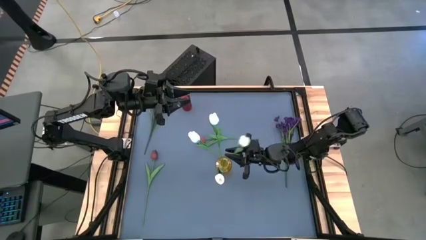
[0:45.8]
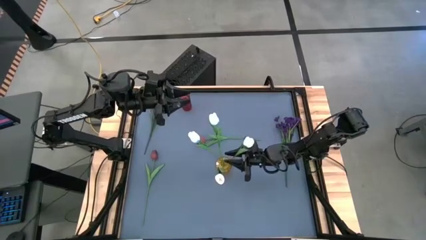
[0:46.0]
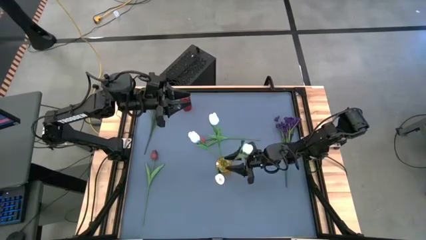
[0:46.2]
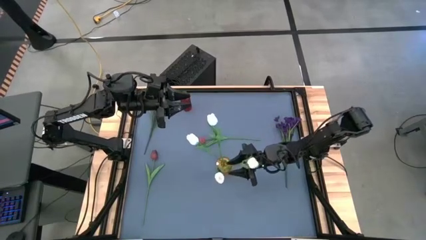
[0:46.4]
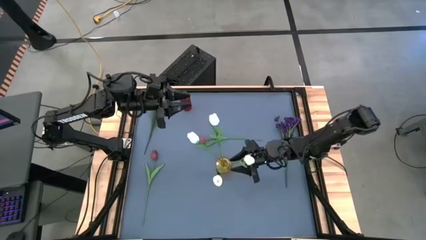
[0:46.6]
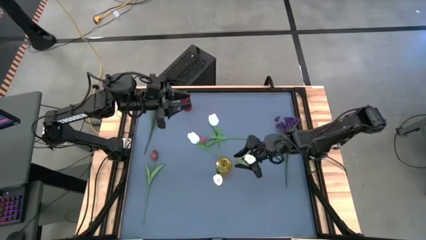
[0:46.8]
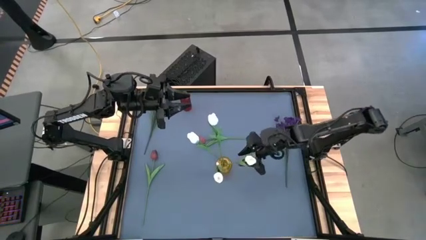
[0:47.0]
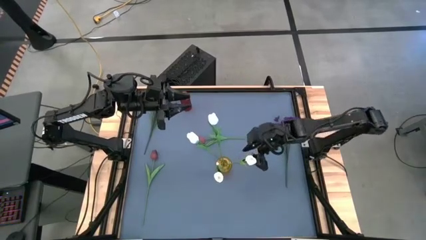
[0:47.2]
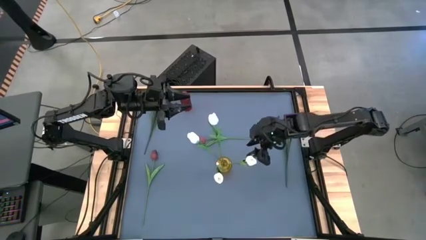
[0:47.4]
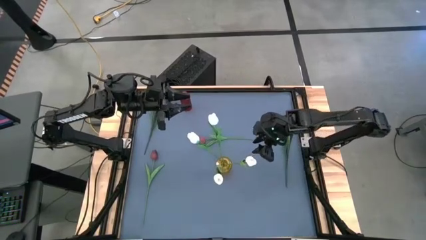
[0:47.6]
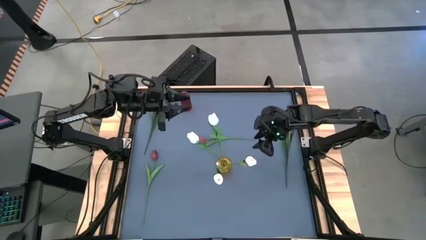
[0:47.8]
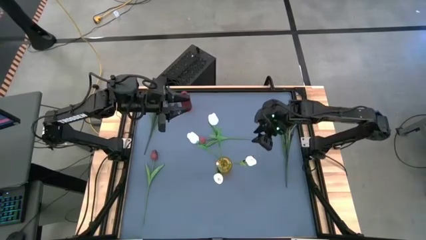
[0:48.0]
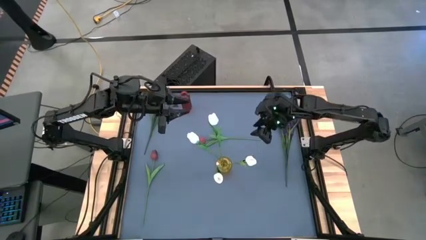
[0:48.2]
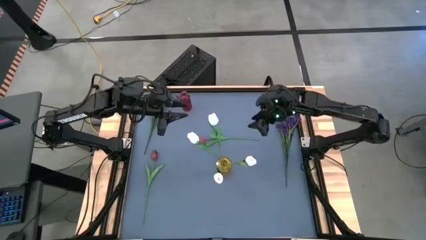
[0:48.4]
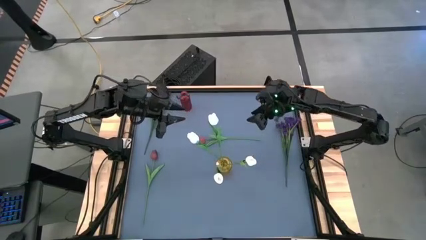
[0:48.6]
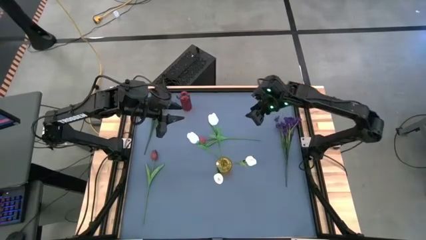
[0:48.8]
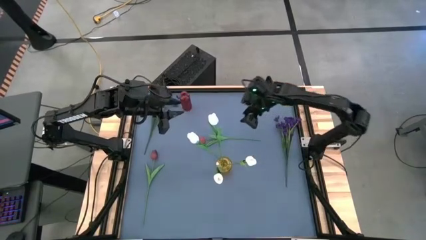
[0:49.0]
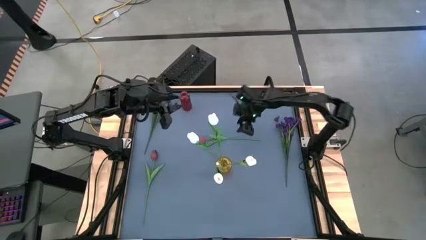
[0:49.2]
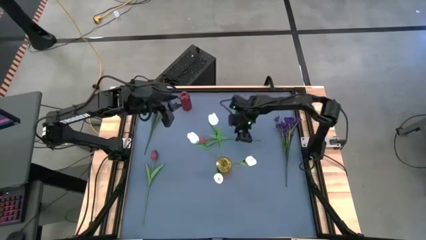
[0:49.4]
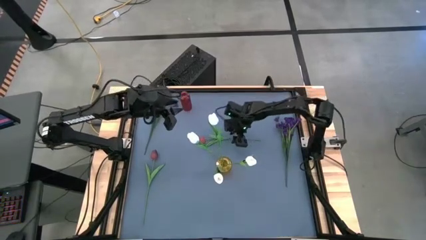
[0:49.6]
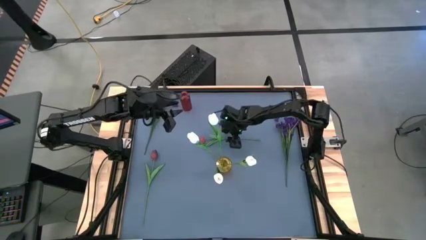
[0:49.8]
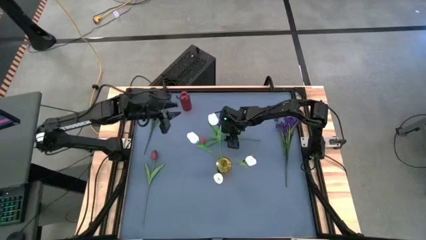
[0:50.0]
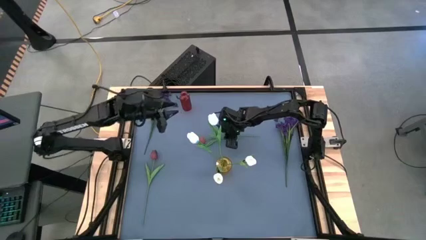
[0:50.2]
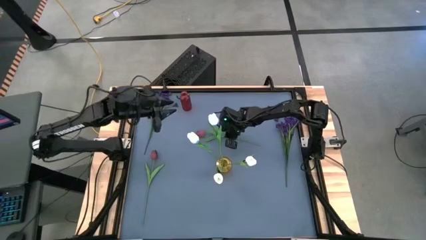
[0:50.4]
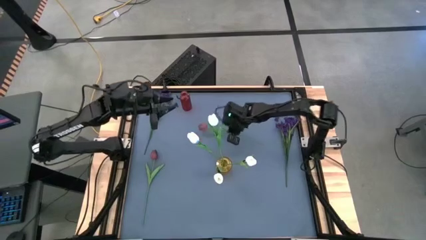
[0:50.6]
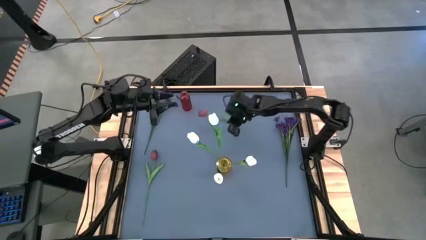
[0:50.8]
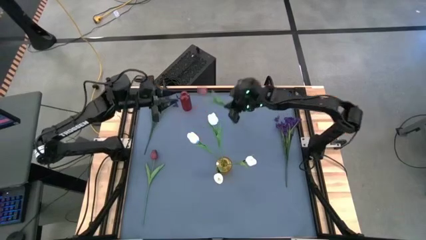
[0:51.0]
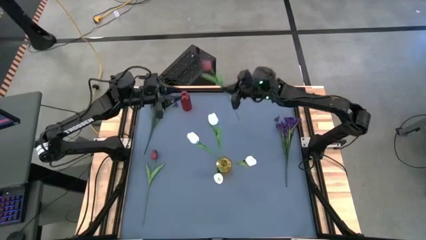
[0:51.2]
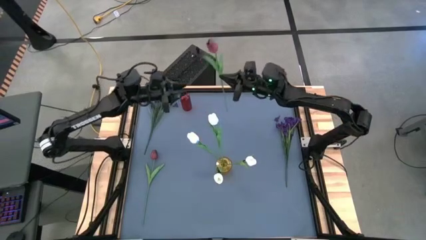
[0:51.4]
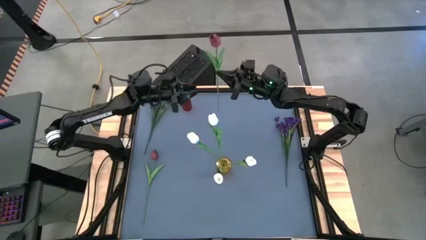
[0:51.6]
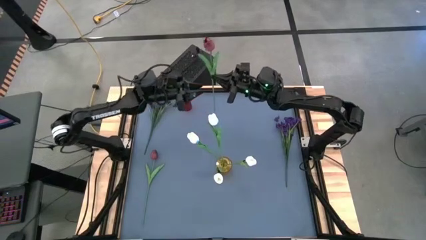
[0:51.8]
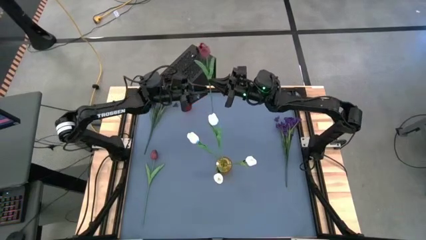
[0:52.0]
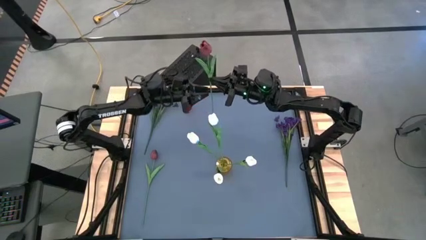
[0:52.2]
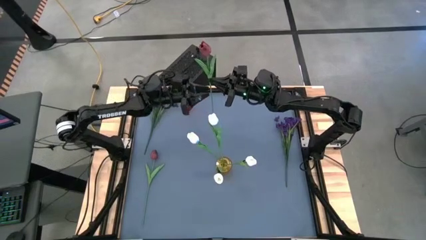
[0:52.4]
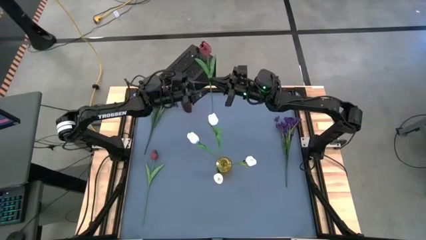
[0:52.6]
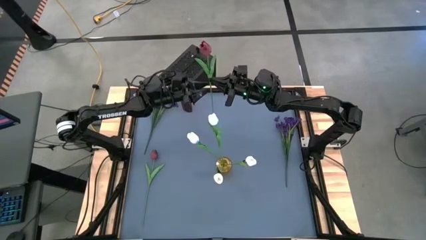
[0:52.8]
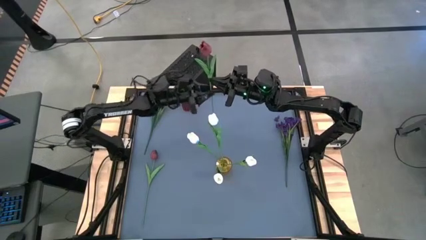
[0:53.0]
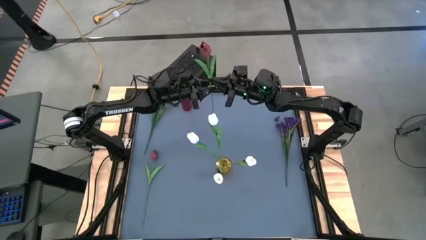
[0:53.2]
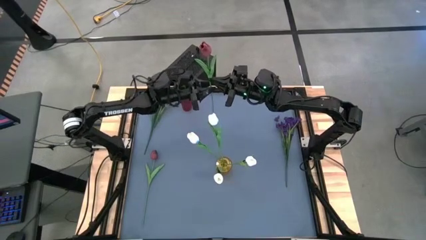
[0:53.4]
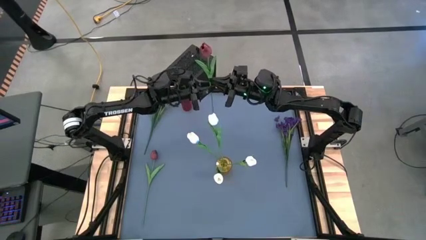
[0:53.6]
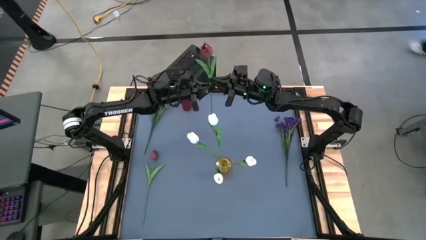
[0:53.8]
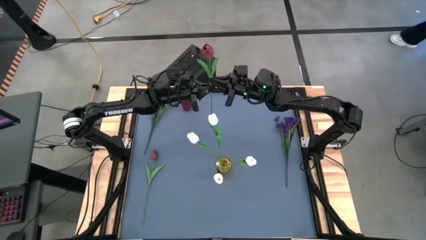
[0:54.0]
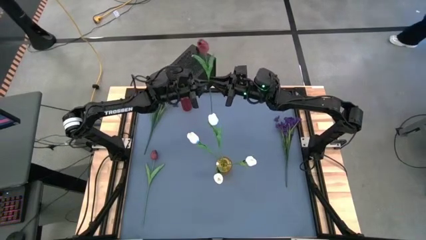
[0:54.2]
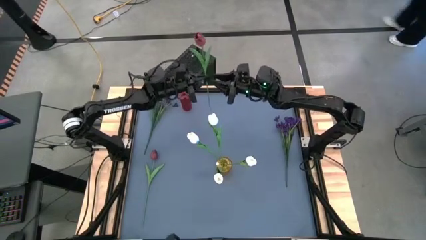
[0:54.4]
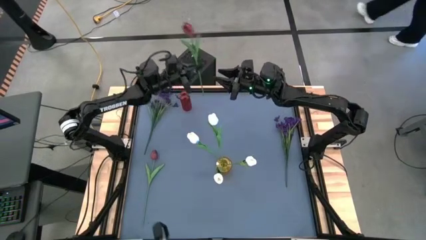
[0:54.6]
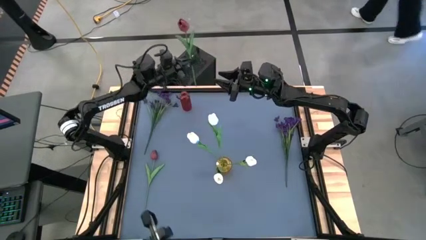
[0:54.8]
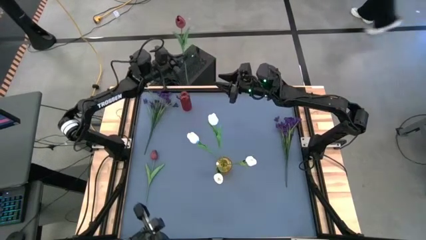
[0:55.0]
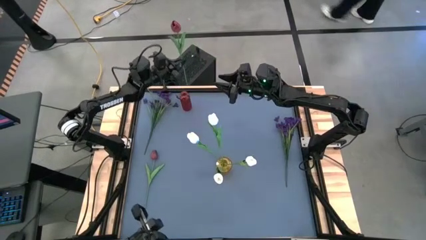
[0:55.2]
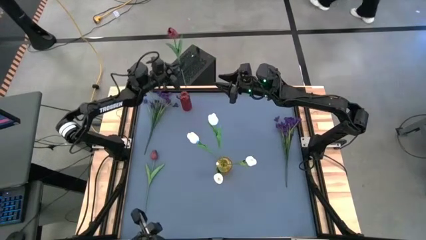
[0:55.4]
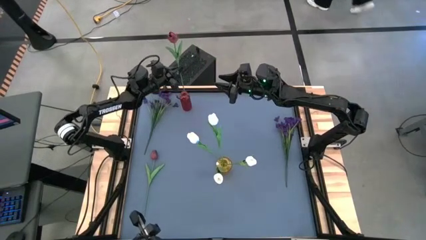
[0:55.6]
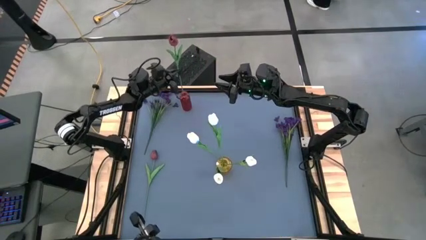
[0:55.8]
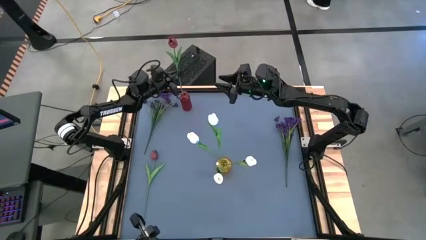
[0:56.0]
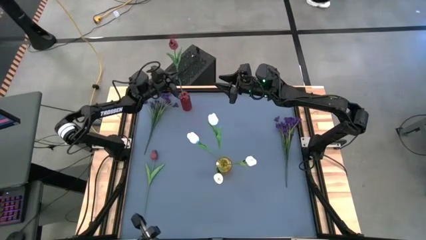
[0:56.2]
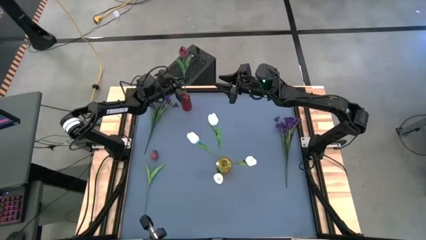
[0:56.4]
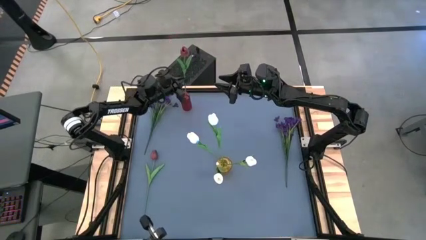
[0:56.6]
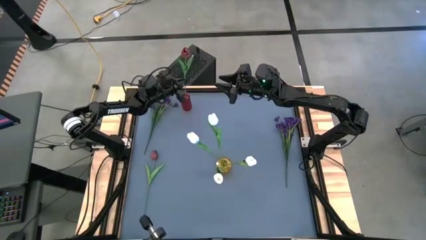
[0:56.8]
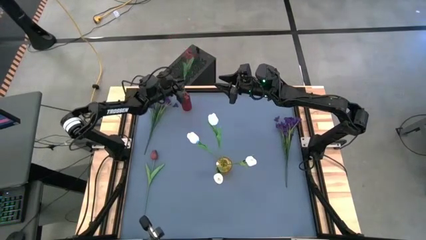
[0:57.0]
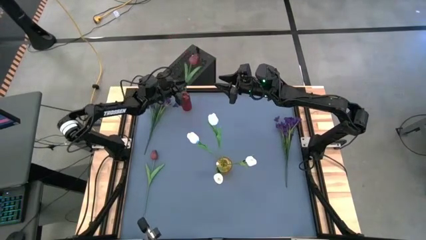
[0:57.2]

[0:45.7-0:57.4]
Task: Sort flowers into vase by color
Put the red flower into the red vase

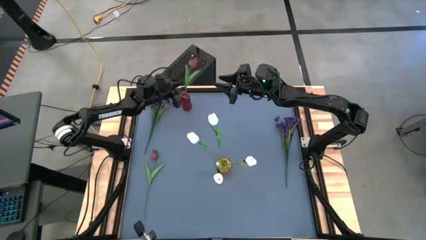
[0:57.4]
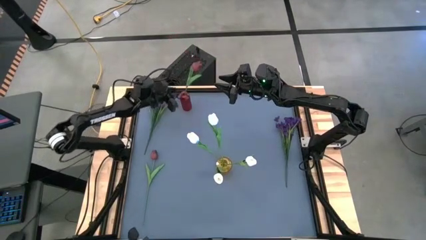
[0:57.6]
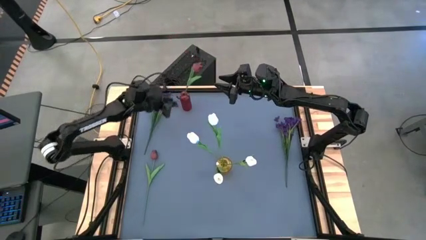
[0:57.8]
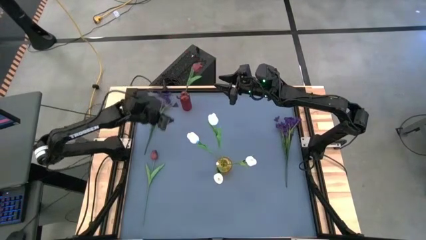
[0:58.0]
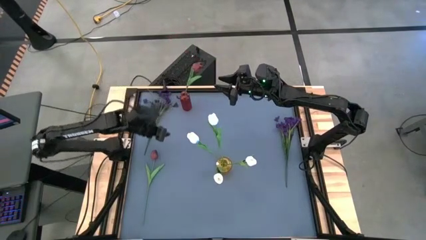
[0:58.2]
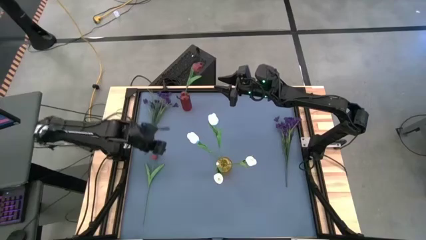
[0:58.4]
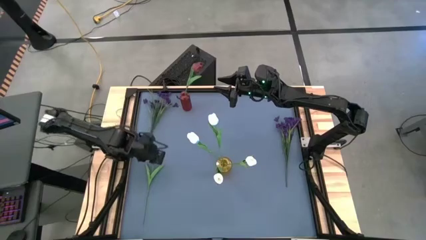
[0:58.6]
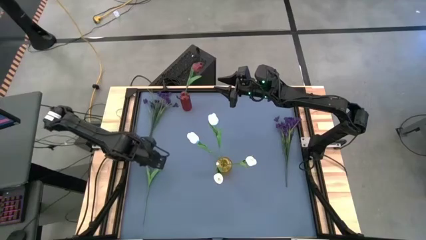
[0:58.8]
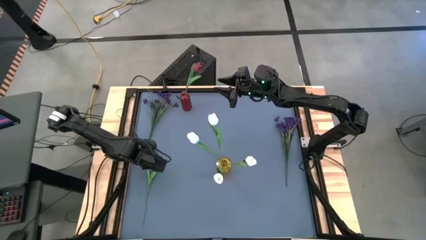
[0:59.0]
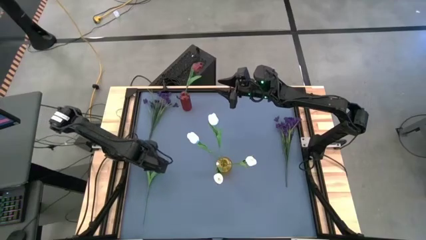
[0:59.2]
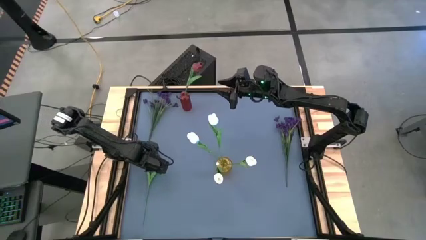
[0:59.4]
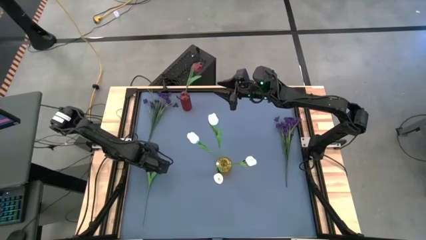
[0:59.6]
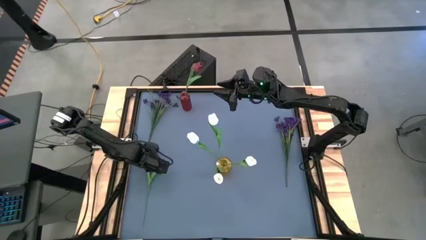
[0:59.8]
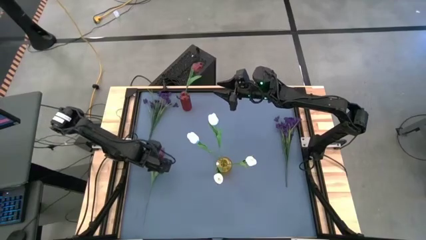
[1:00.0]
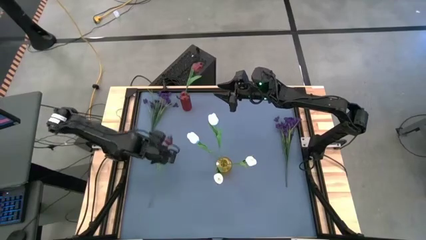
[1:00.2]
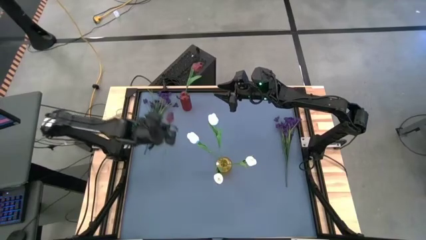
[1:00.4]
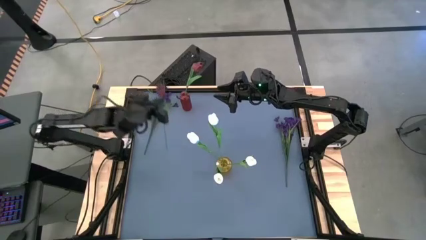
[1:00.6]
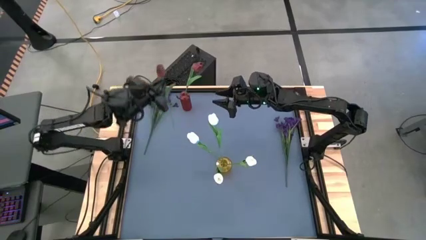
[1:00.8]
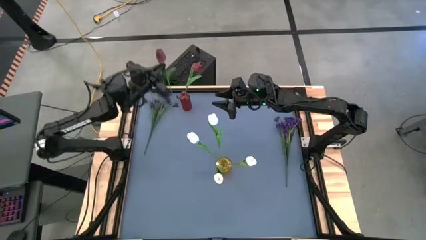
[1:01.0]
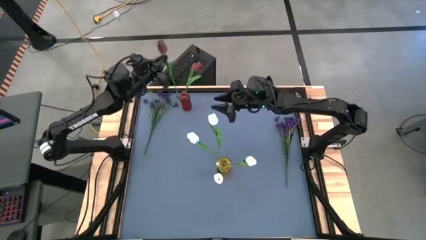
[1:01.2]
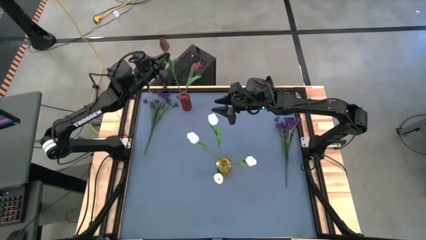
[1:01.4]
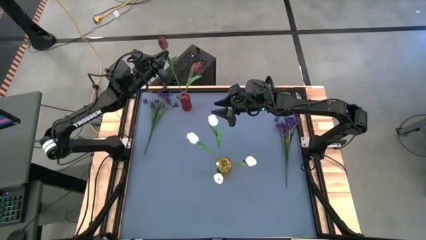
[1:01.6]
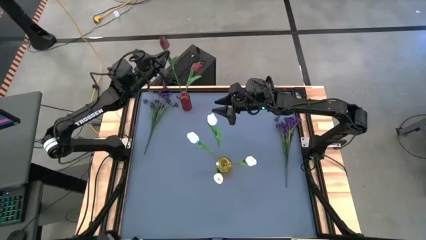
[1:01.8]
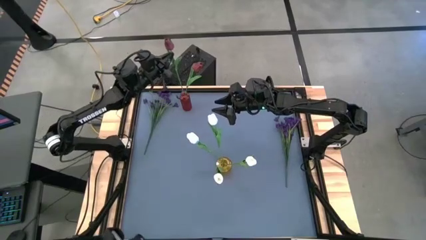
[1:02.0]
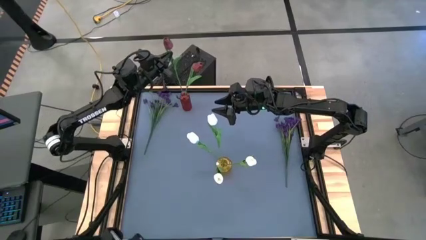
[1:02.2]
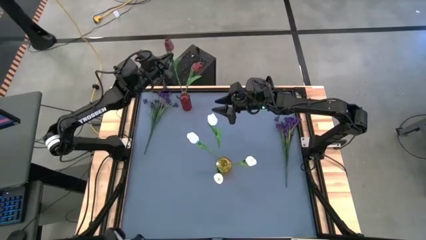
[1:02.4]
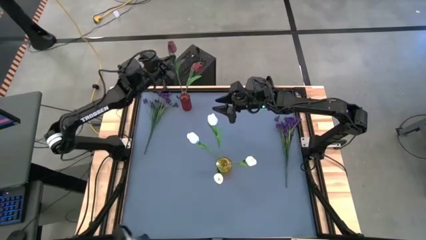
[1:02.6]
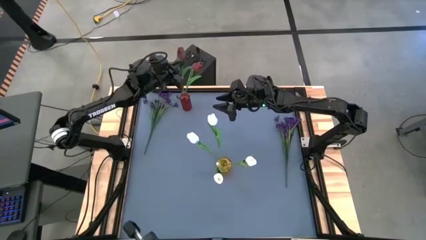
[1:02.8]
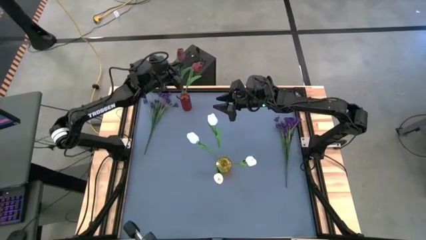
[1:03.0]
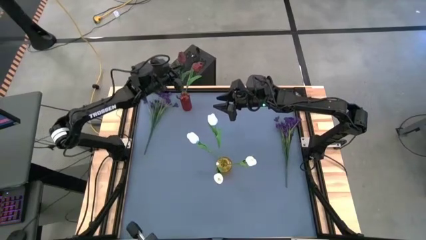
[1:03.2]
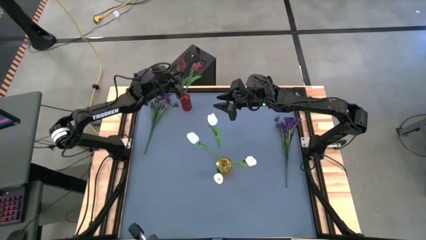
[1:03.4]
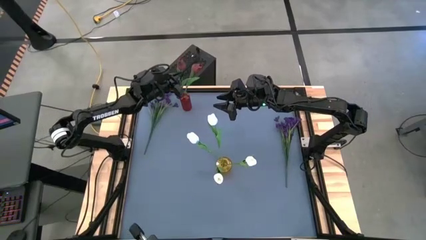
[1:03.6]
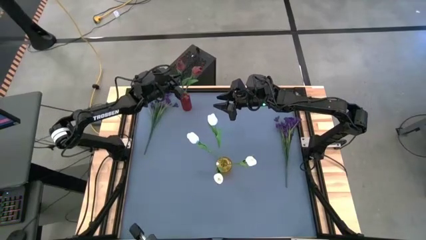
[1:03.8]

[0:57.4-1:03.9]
Put the red flower into the red vase
